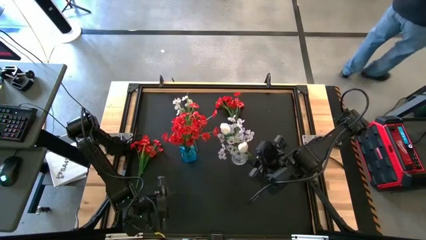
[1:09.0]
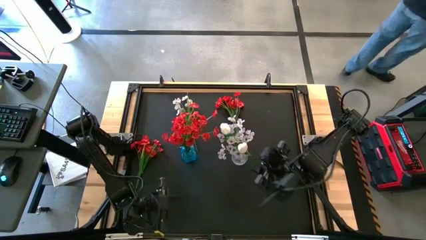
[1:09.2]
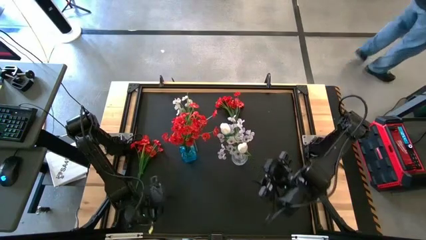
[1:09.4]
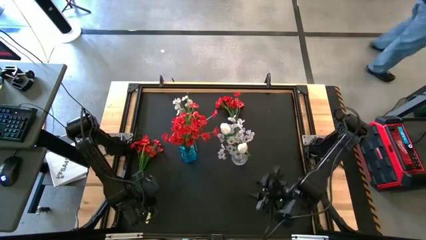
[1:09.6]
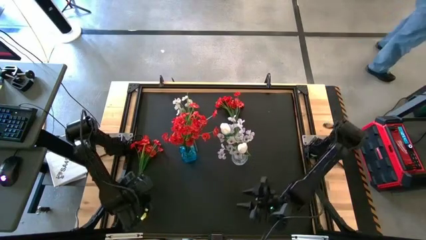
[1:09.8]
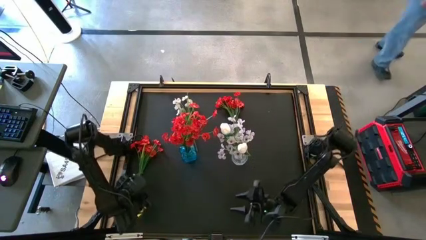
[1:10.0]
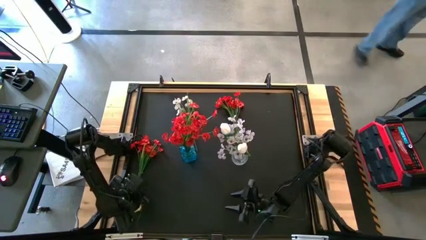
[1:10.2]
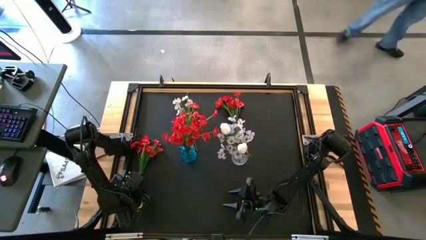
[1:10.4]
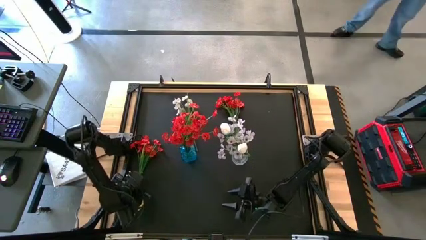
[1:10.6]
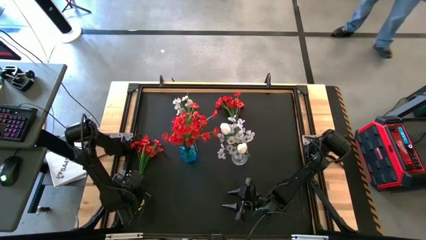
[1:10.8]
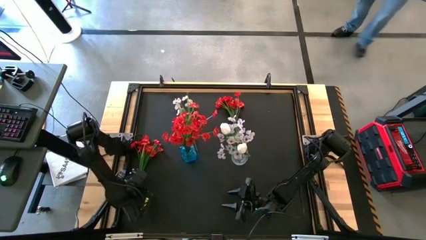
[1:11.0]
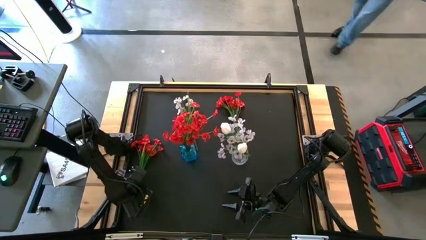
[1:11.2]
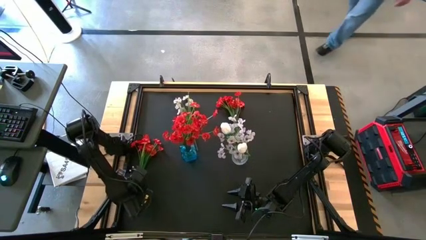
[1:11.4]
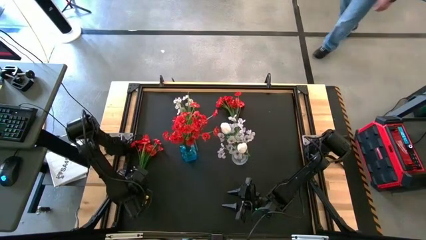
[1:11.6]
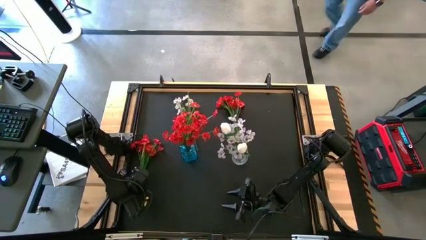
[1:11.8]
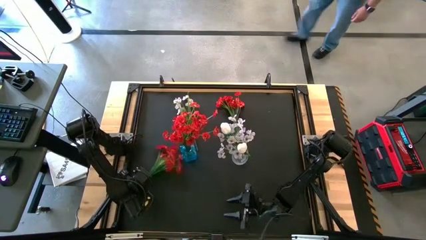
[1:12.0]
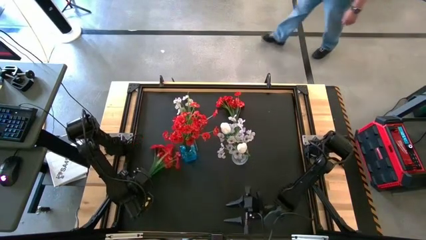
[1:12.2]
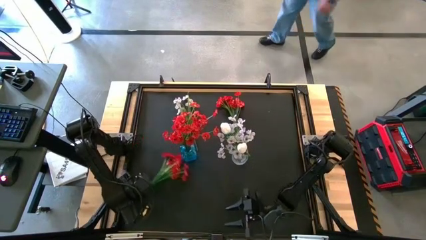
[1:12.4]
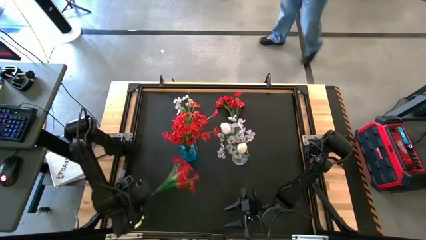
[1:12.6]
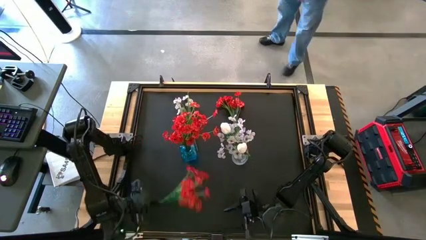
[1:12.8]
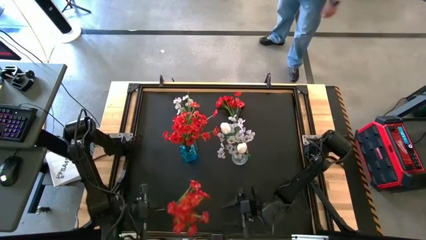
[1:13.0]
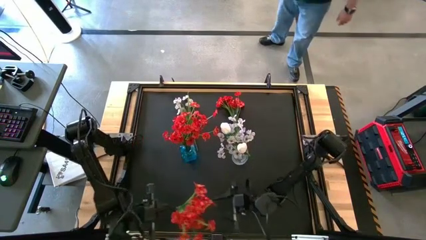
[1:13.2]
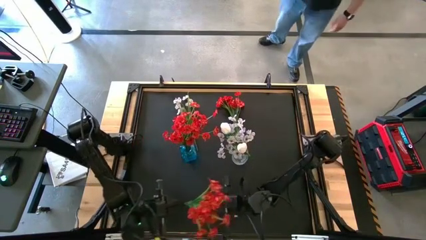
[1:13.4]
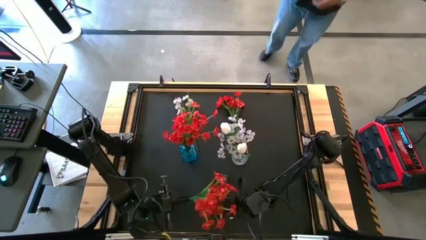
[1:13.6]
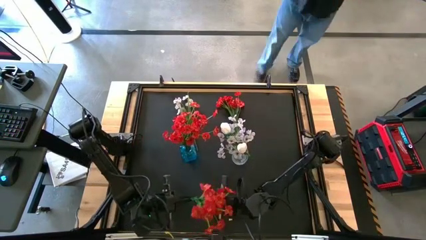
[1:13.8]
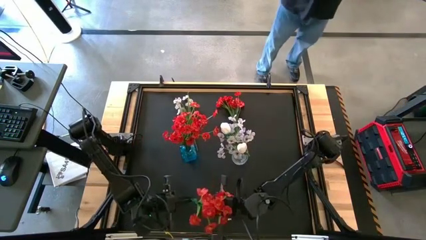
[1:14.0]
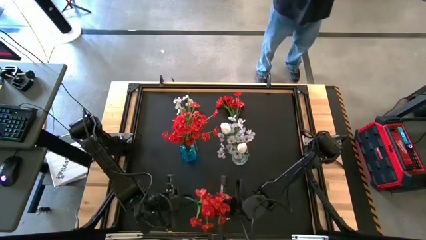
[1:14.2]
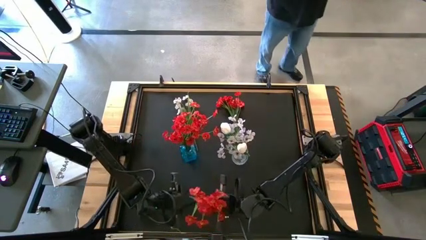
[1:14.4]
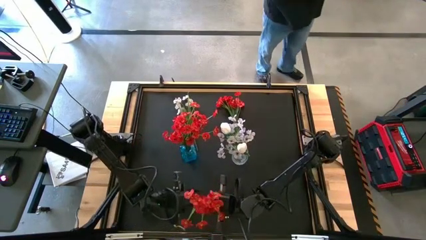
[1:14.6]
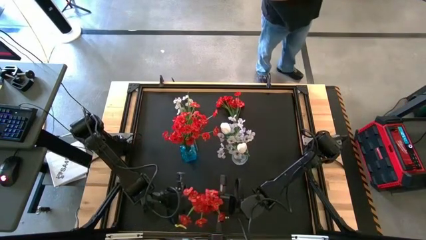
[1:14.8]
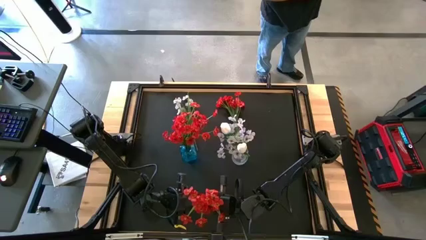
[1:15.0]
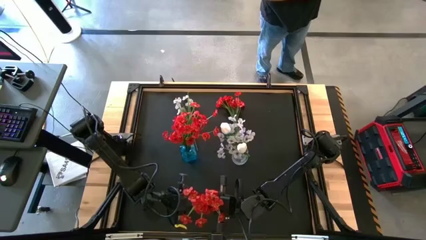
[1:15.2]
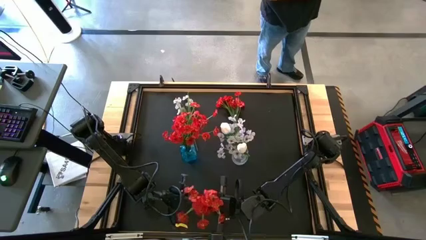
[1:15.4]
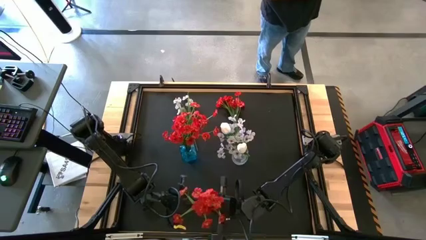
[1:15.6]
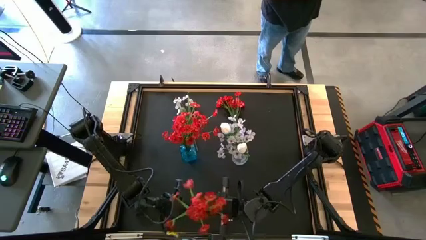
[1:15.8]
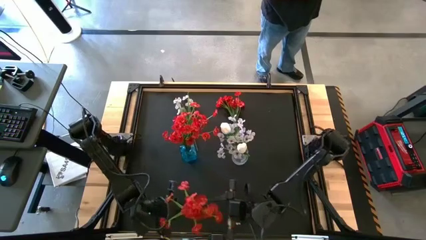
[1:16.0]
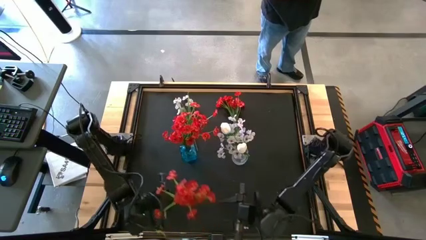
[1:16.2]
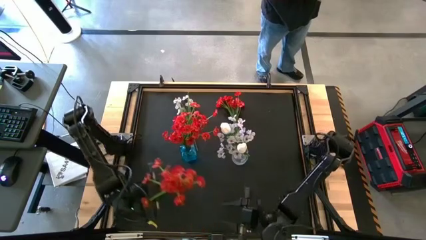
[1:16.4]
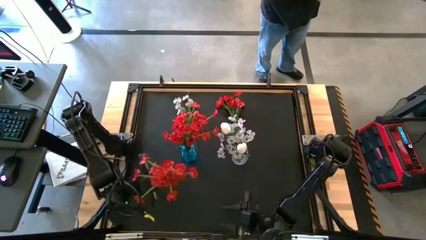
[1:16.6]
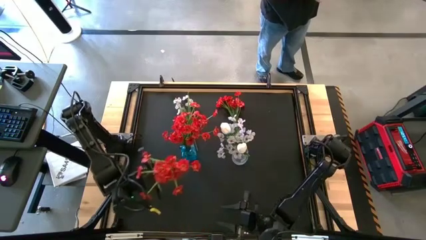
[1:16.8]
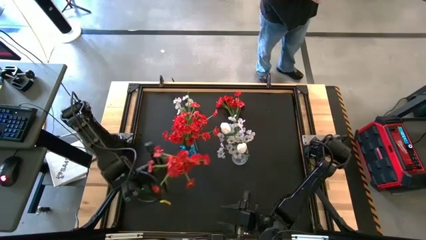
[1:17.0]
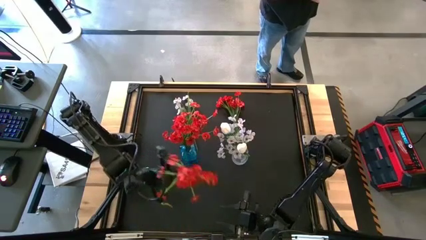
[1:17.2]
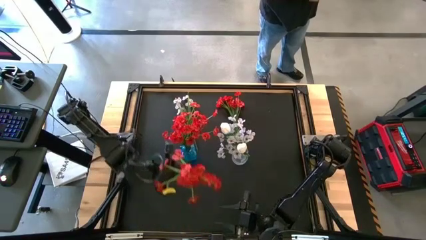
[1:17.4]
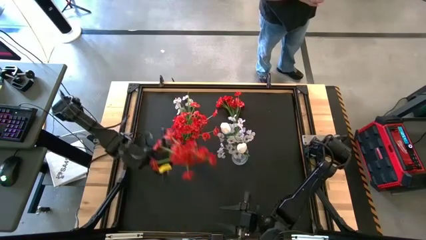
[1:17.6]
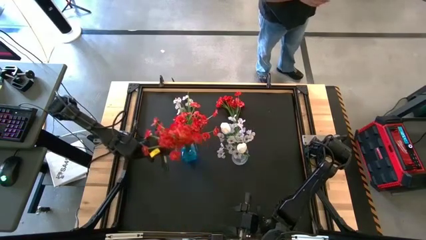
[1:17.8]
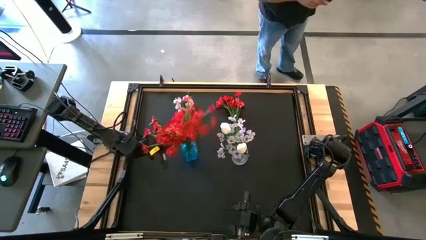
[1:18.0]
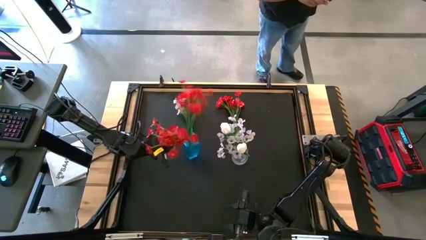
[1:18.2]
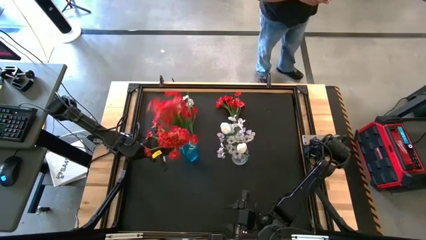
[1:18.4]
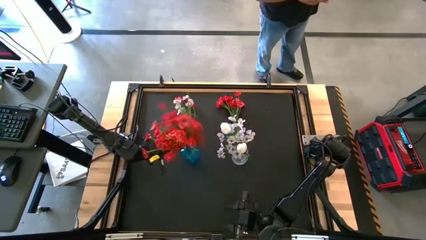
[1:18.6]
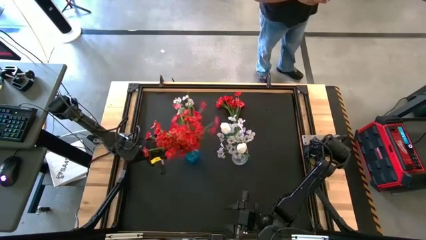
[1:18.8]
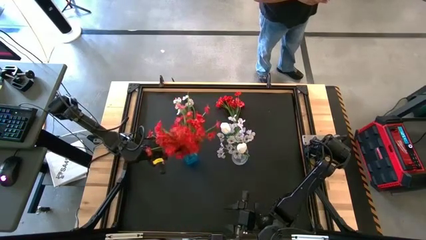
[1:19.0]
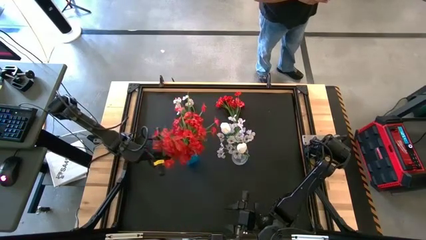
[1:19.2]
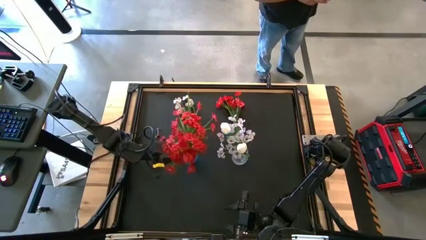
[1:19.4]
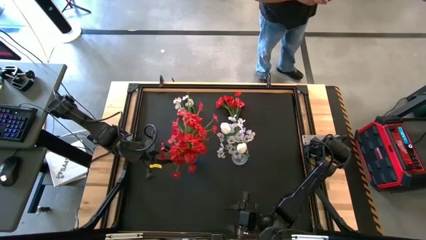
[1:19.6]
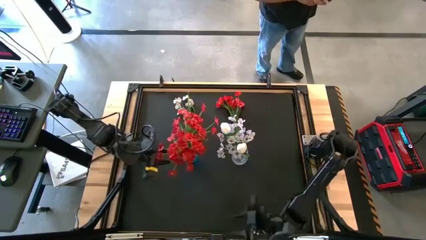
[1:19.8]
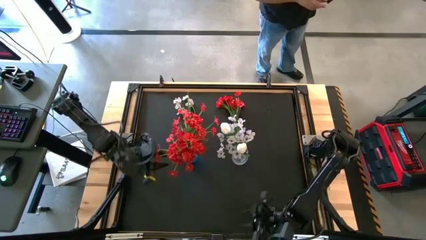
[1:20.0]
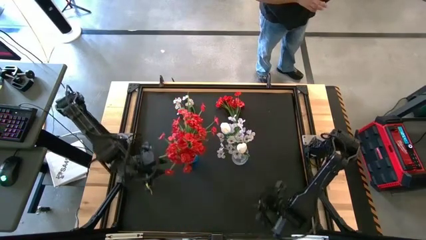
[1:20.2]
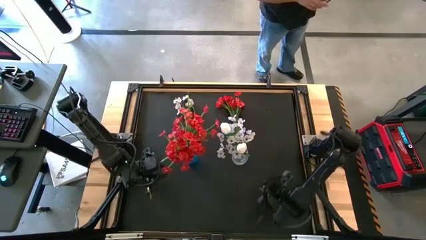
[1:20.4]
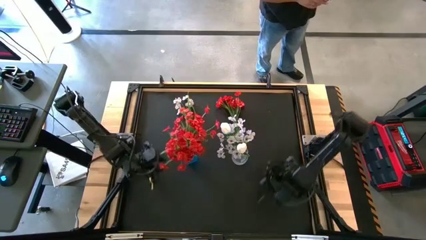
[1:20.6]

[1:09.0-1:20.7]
Task: Sort flowers into vase by color
Put the red flowers into the blue vase

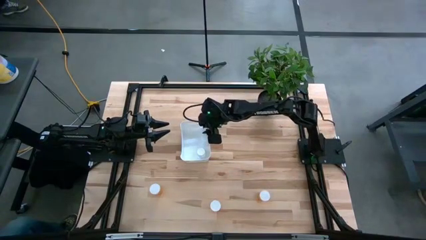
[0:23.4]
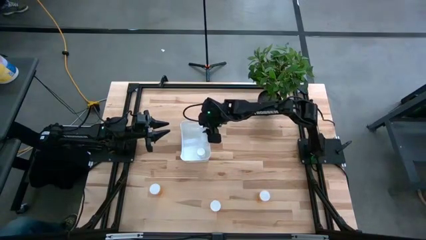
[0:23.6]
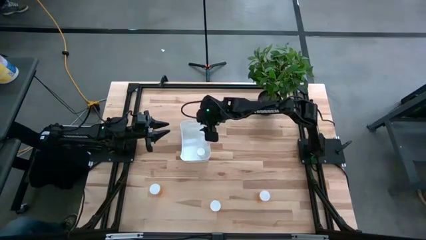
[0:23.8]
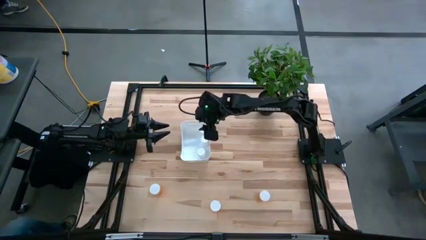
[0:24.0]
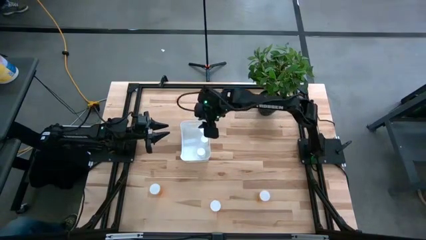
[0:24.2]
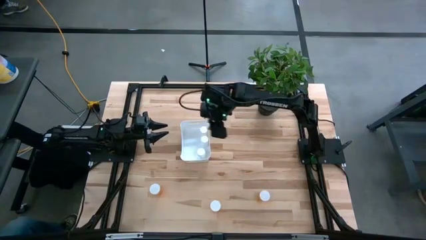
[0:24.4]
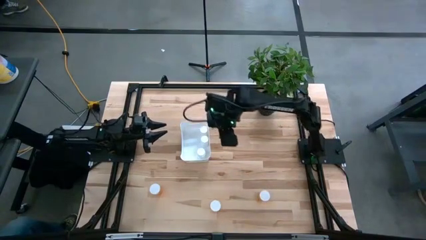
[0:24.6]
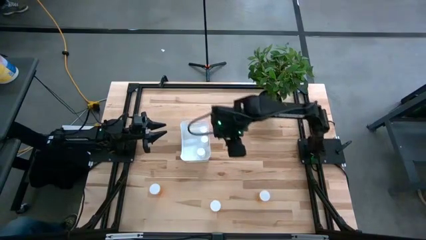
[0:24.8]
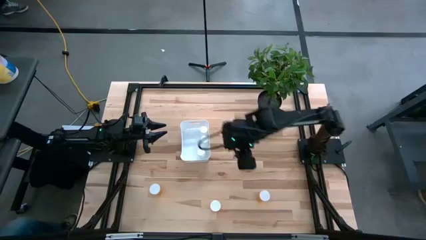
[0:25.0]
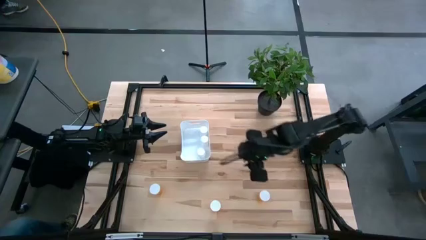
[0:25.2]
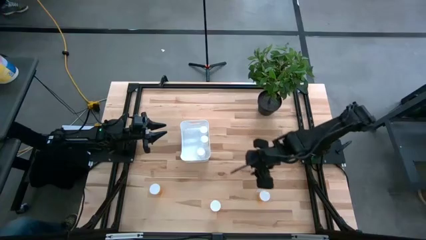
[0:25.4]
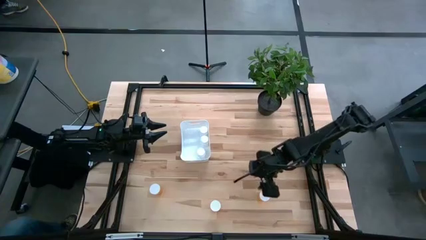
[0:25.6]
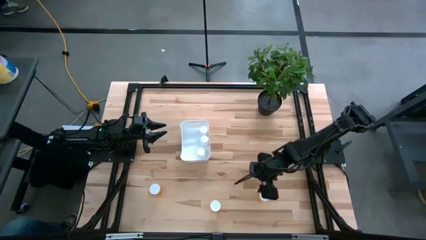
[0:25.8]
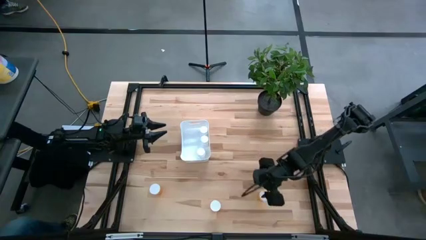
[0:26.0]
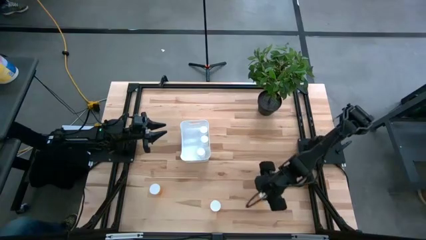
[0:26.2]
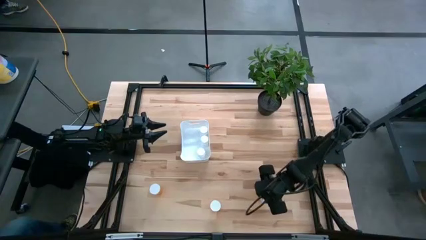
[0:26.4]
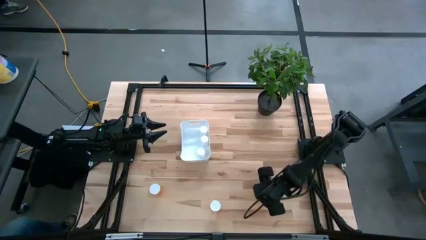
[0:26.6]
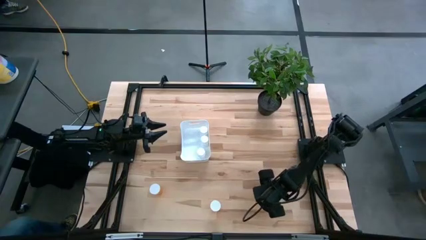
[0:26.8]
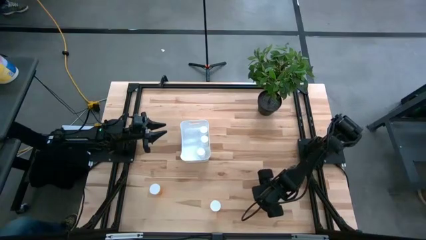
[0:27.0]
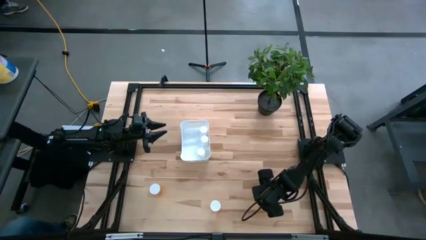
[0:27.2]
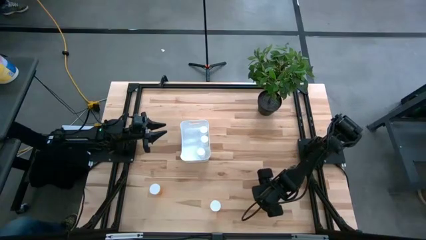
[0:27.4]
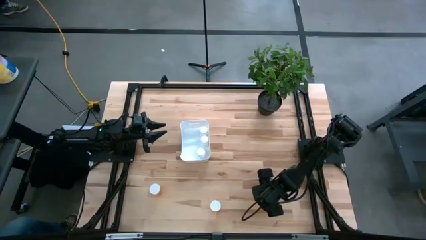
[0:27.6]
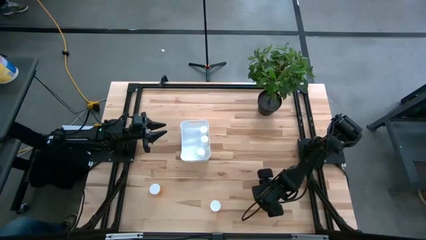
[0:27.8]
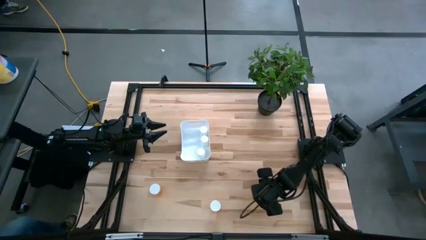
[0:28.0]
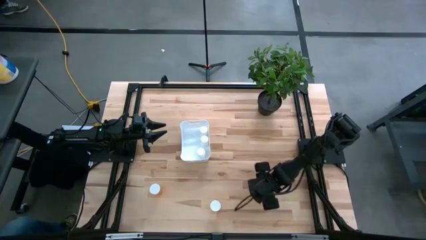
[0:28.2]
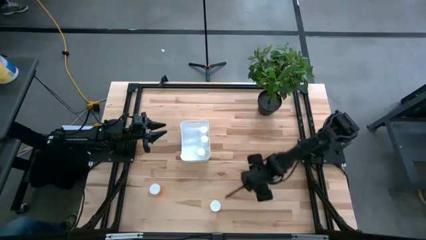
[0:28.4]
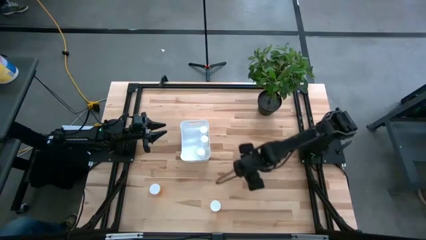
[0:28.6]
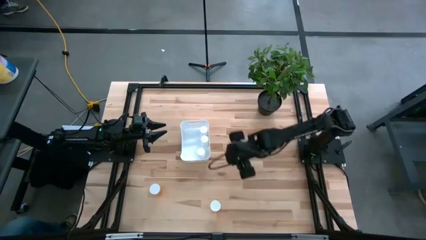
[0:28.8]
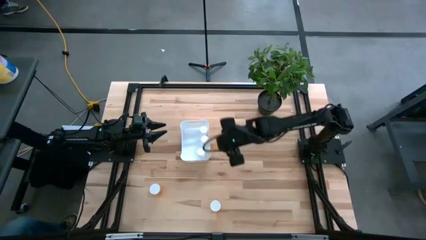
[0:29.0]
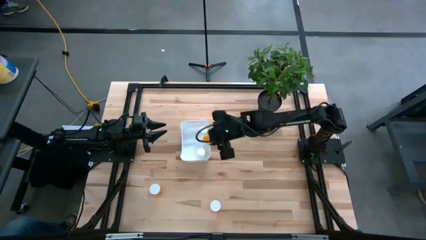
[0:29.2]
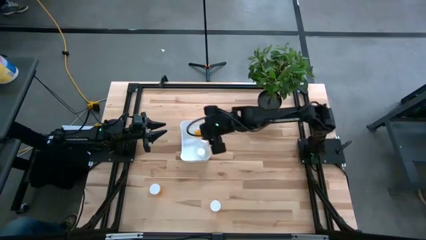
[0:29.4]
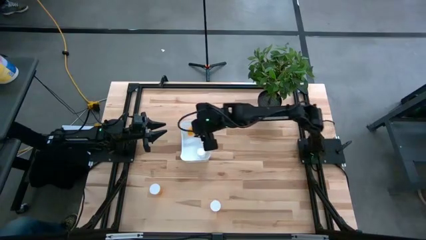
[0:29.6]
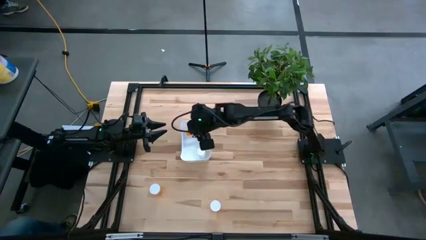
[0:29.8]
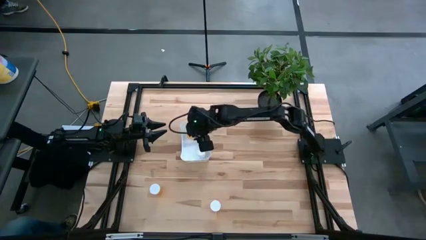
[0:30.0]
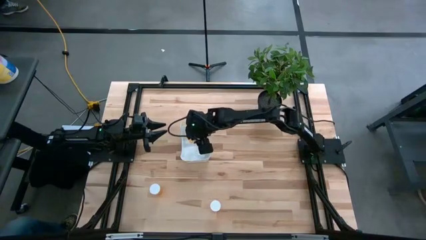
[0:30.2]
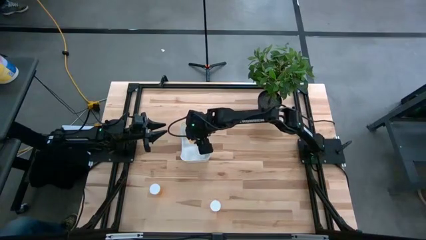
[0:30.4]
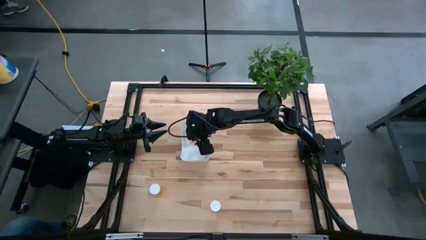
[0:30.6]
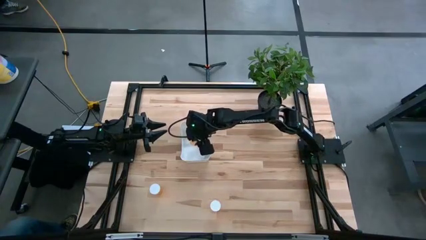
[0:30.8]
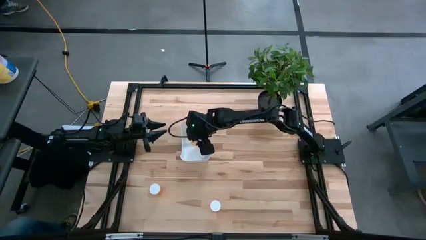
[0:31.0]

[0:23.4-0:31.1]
Task: Pick and place pill bottles into a basket
Put the right orange pill bottle into the white bin
